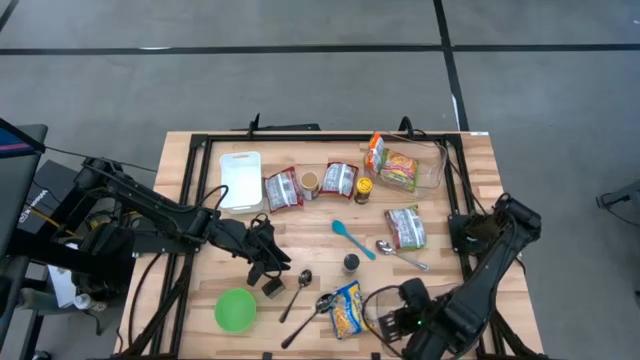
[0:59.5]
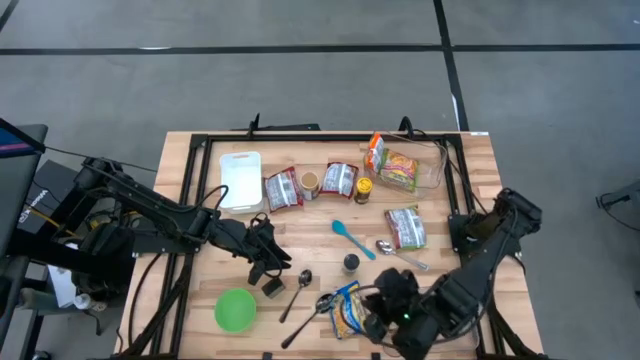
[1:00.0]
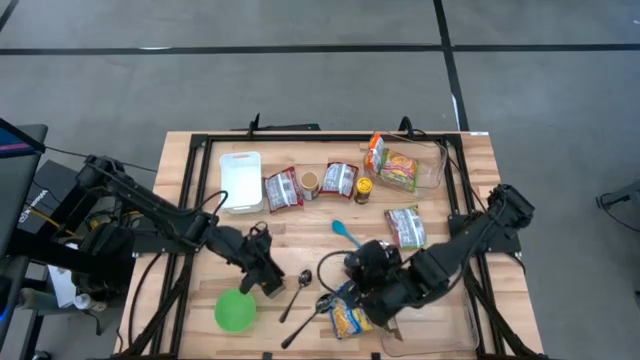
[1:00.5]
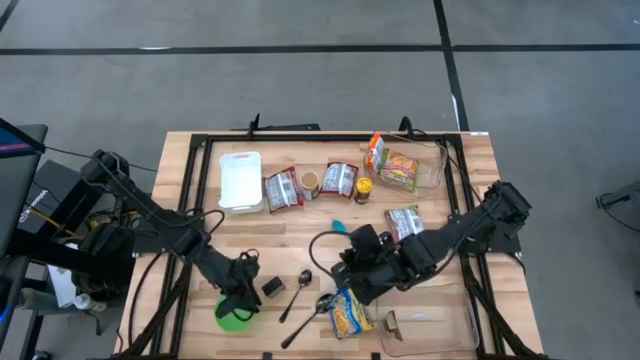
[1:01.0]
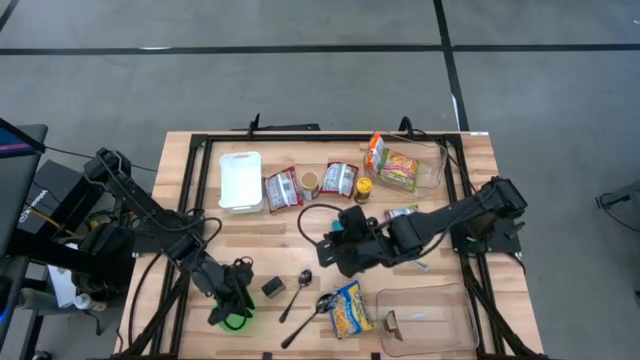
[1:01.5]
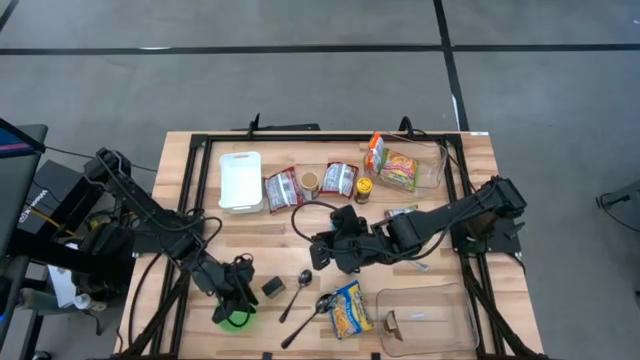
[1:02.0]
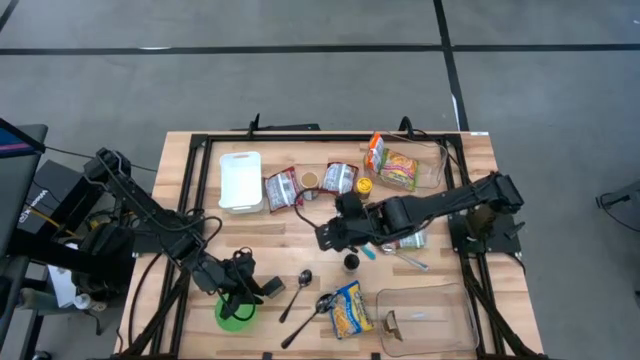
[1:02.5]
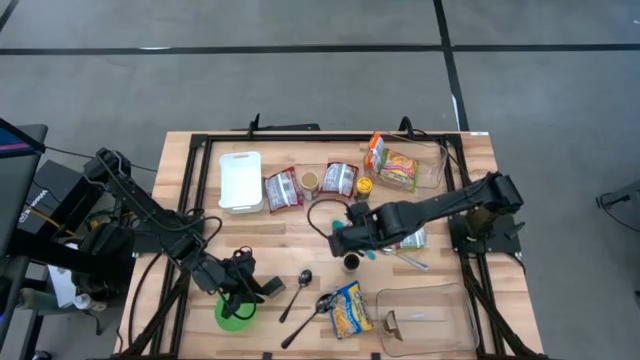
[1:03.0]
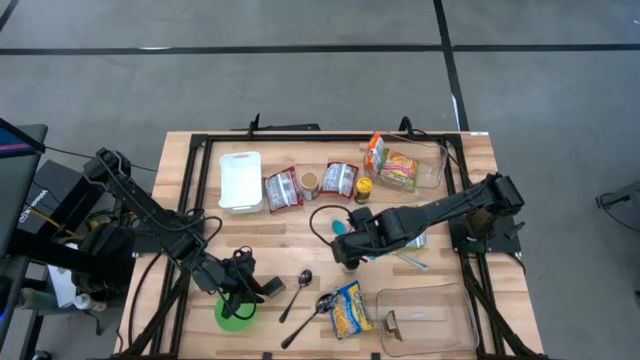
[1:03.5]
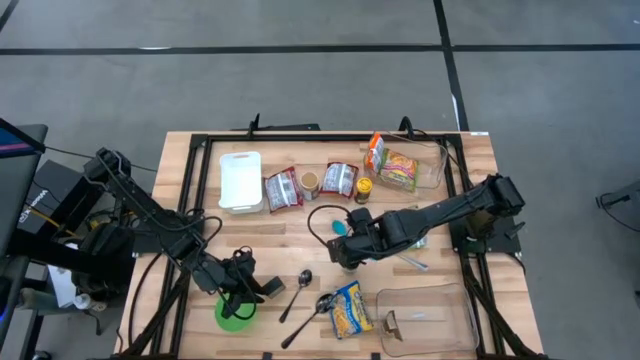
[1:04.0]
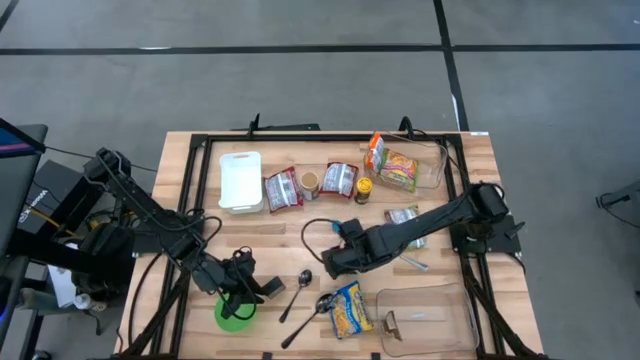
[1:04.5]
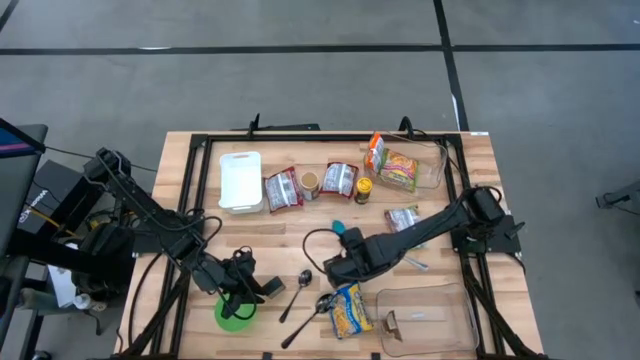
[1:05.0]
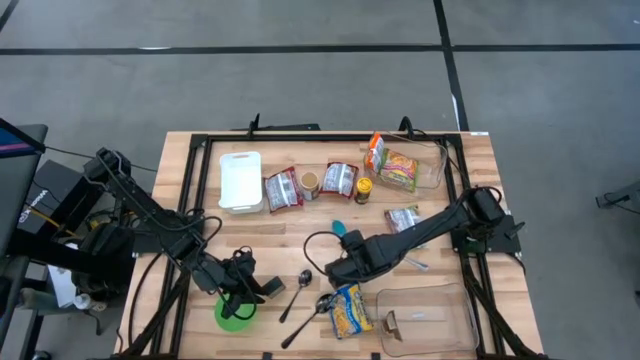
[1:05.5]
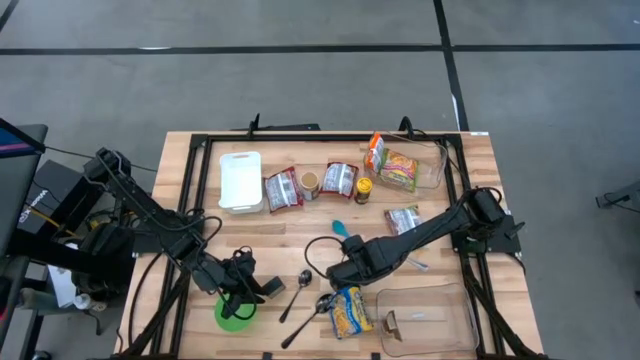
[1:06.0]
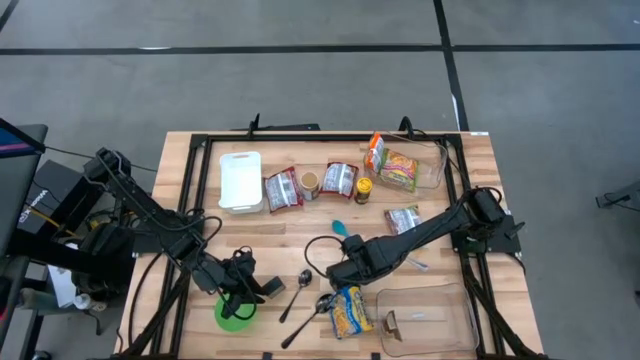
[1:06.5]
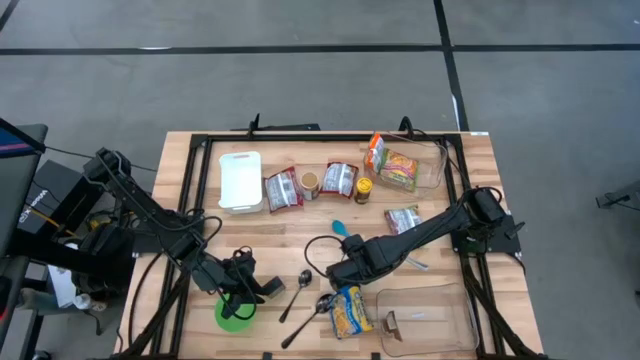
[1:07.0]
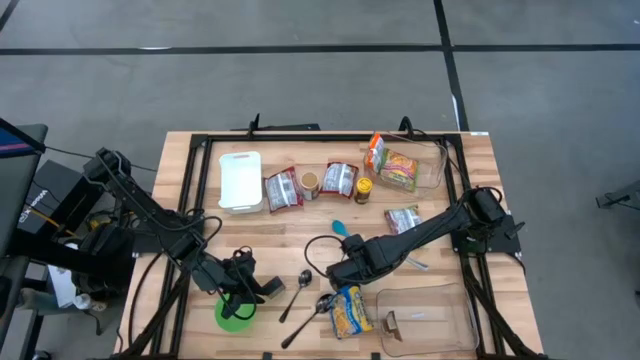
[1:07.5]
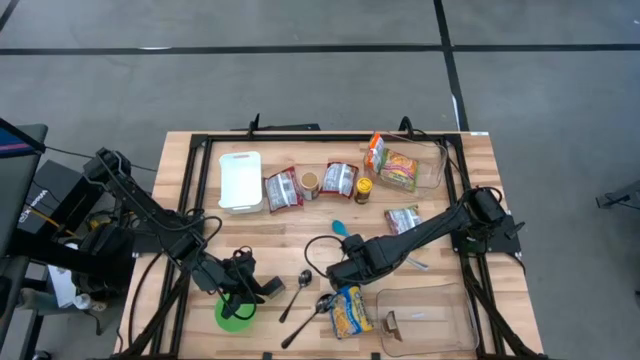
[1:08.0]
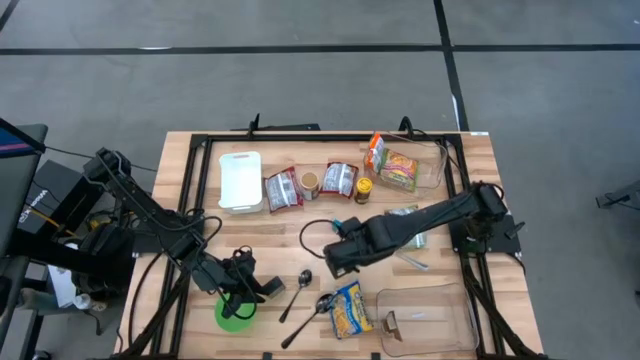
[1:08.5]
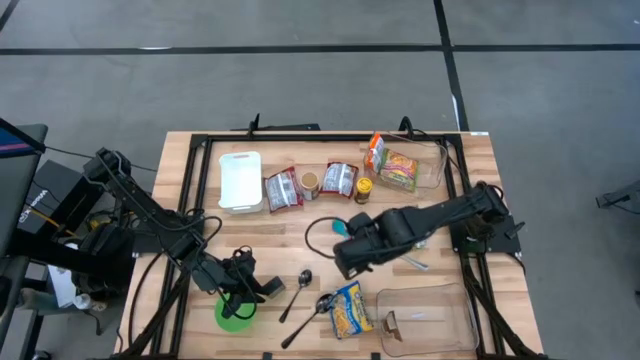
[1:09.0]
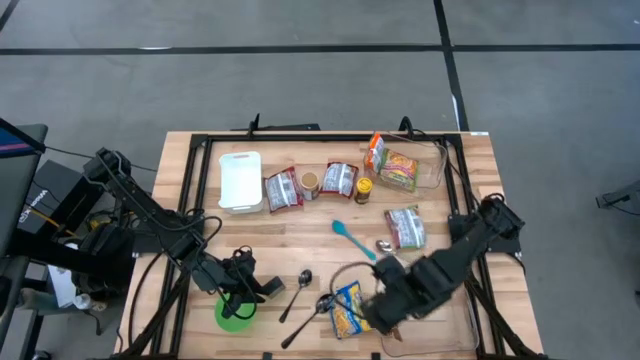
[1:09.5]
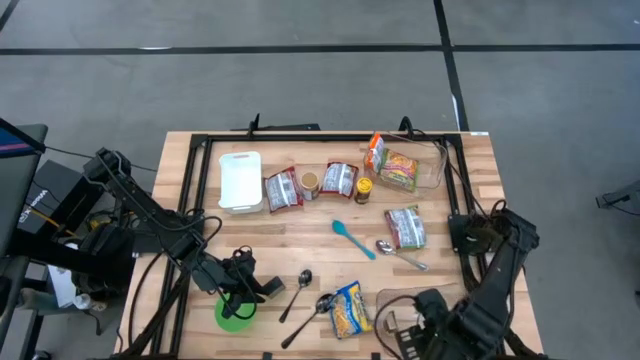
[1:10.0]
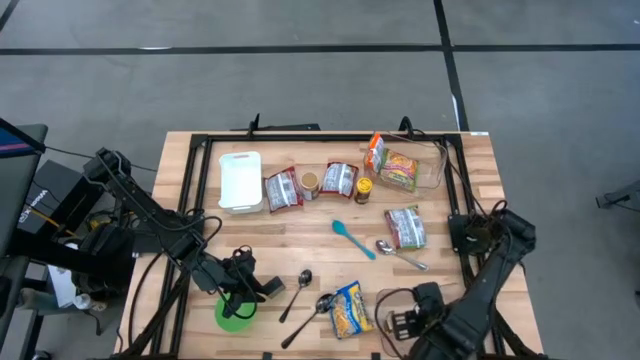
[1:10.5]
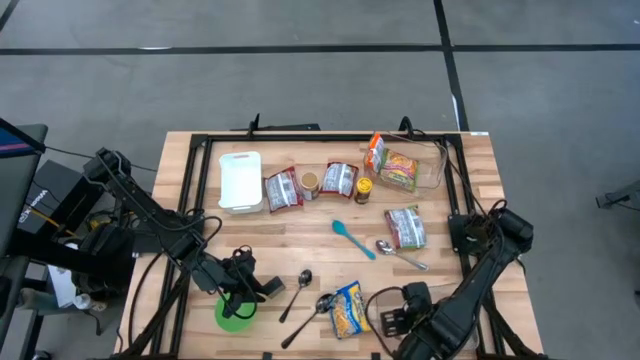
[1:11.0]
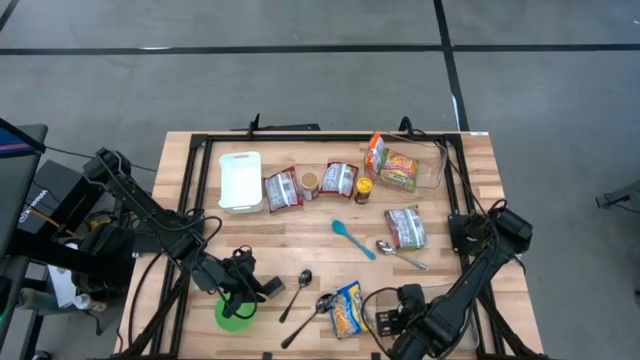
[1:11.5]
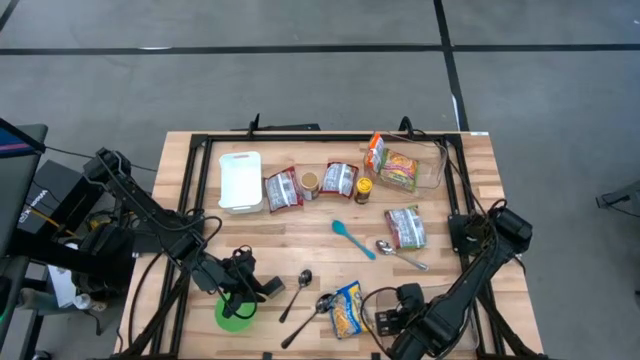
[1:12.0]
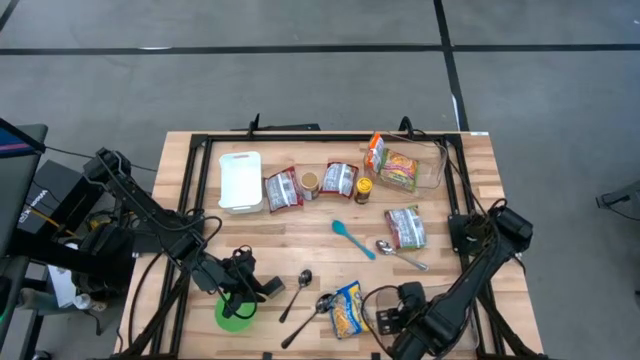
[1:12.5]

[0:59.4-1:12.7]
Task: Pick & Place Food Item
Put the green spice bottle into the bottom transparent bin

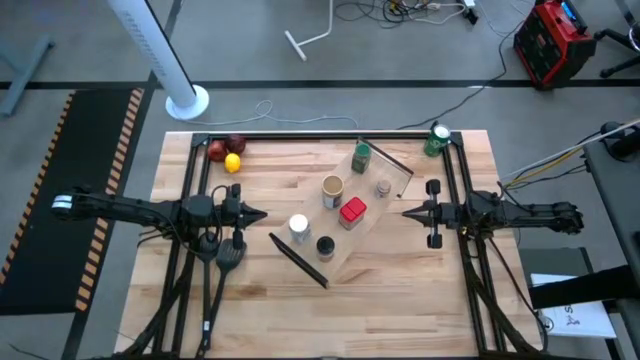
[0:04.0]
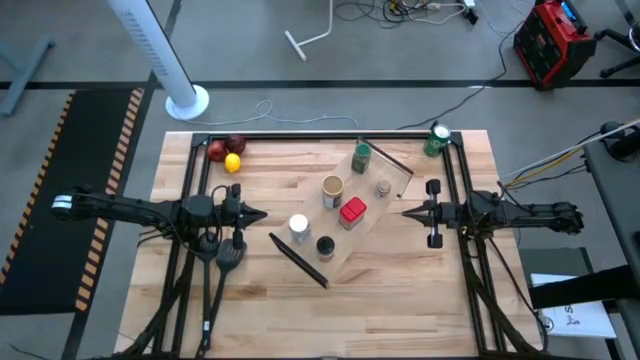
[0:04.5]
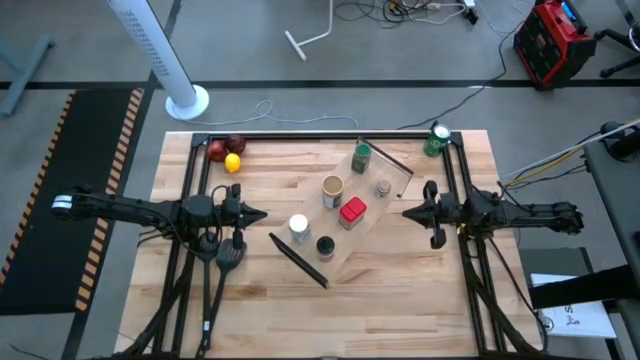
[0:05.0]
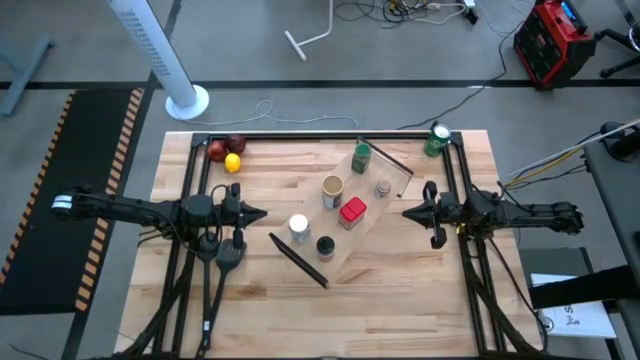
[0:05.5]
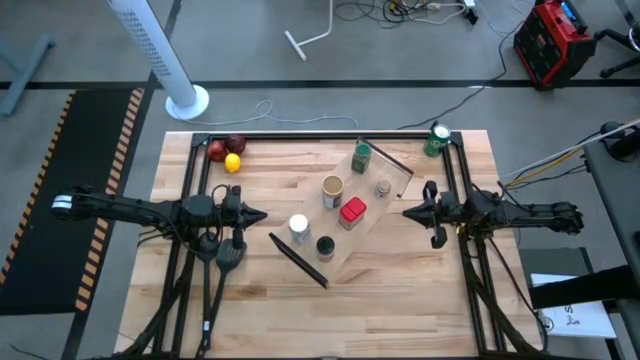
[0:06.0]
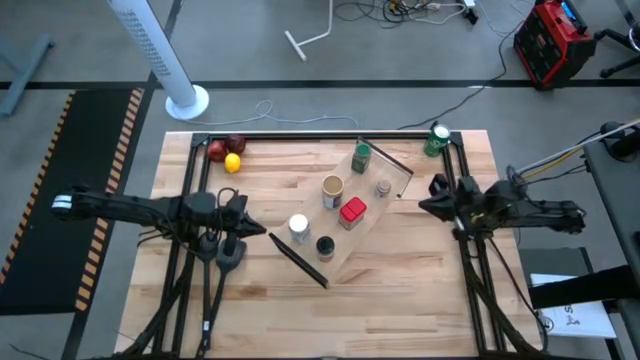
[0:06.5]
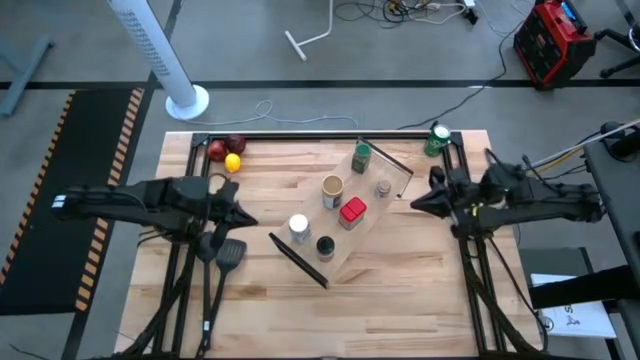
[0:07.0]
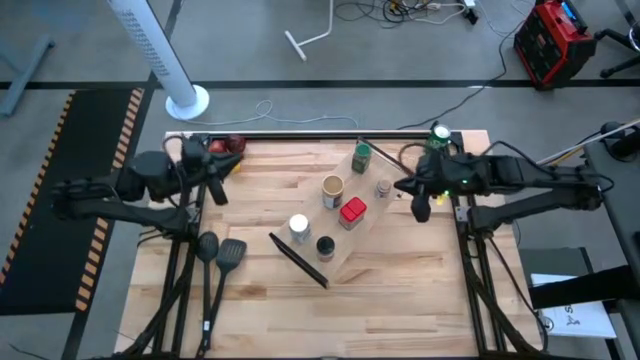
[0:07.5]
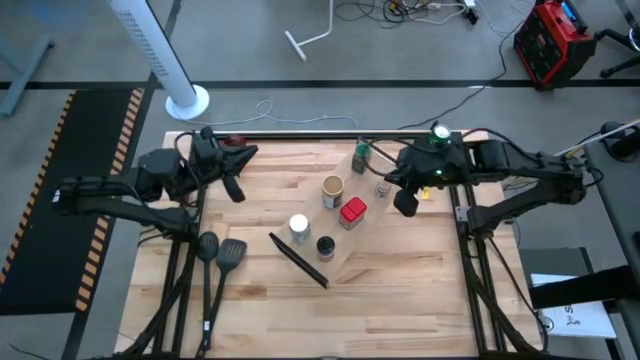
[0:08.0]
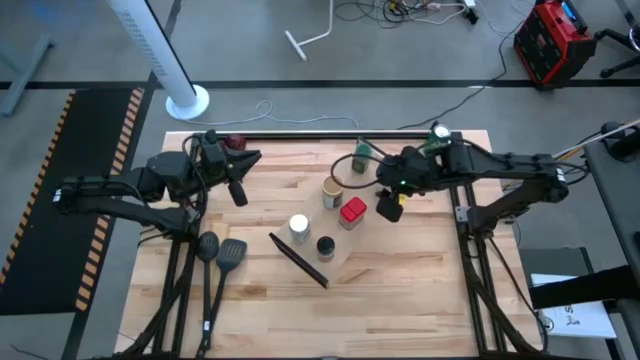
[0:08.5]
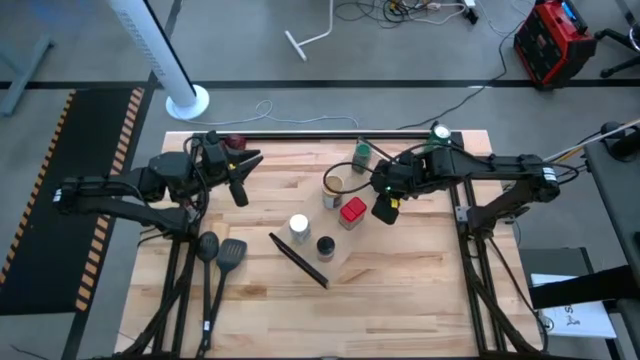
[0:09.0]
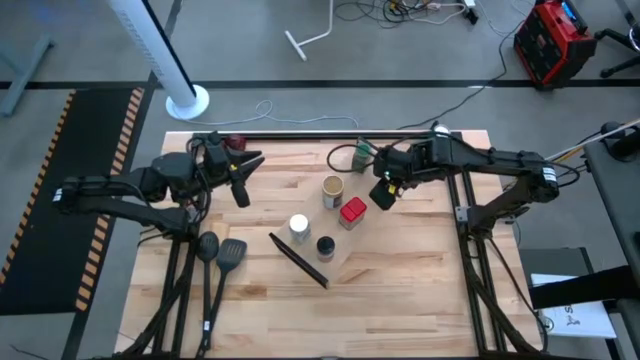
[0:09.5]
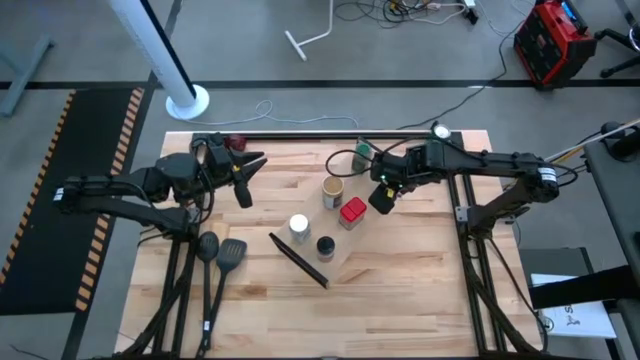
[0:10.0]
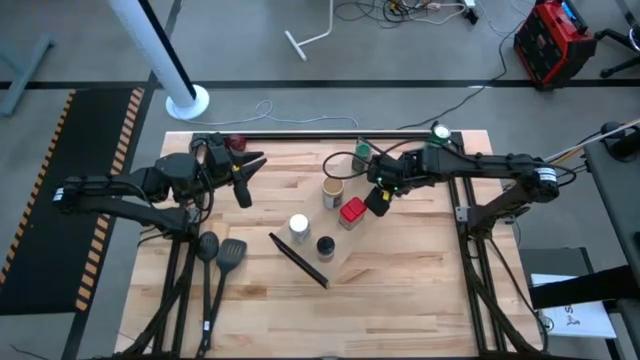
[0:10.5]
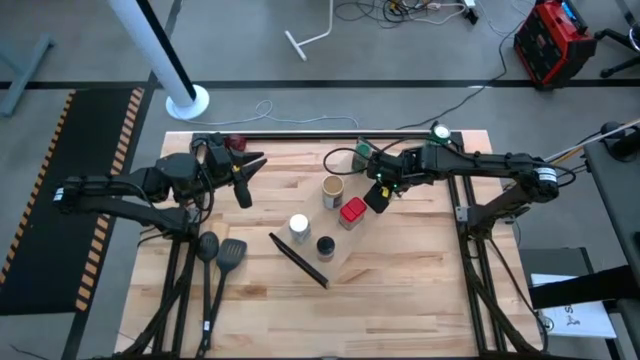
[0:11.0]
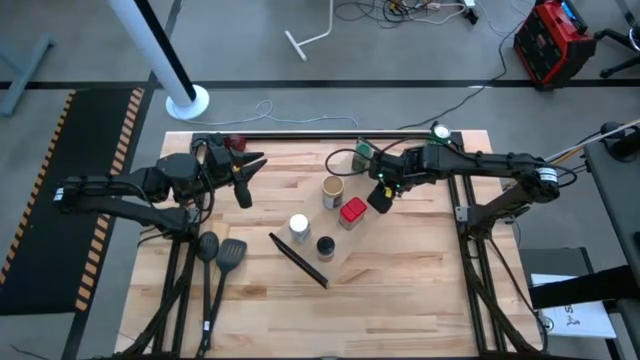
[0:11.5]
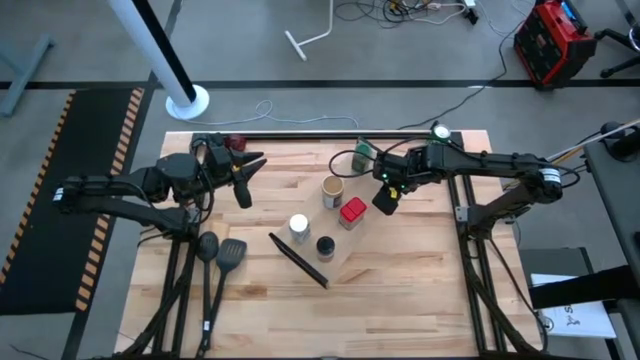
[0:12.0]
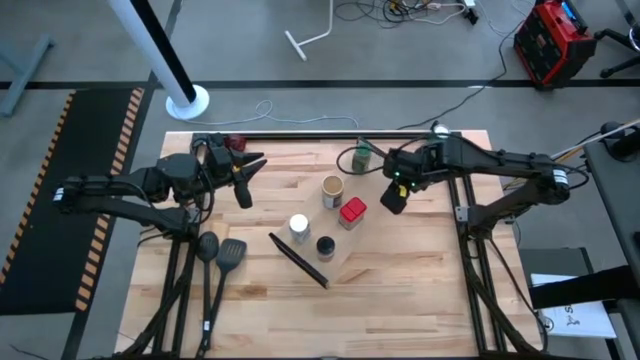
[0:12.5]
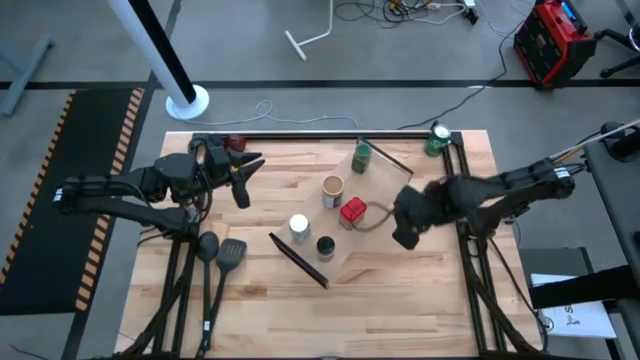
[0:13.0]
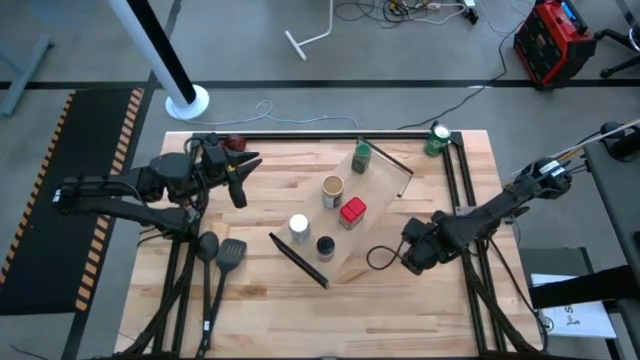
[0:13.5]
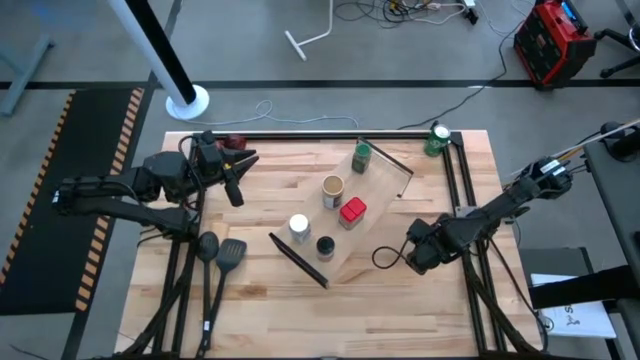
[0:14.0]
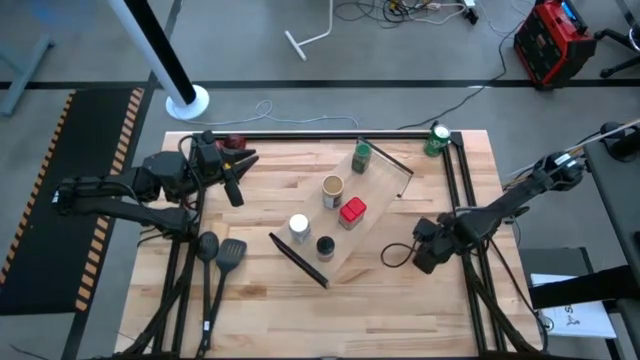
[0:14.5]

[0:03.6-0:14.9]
Task: Shelf spices
Remove the brown seasoning bottle from the shelf
